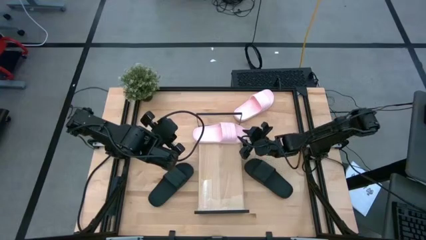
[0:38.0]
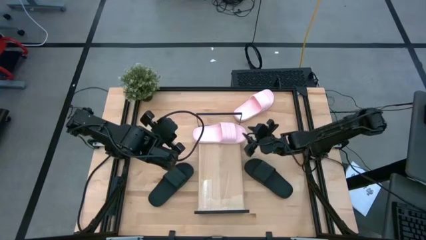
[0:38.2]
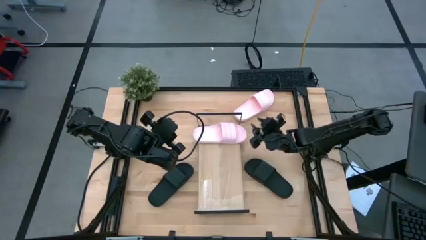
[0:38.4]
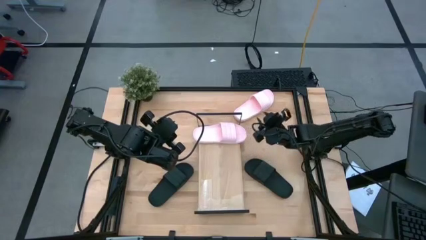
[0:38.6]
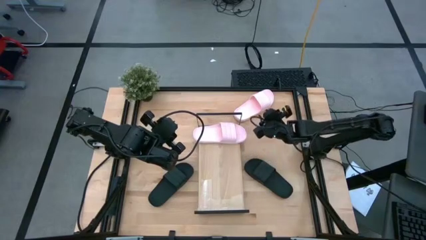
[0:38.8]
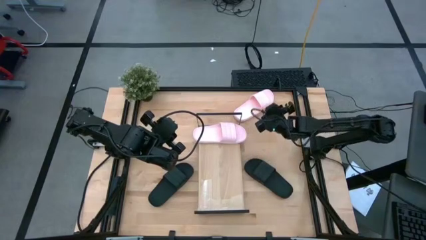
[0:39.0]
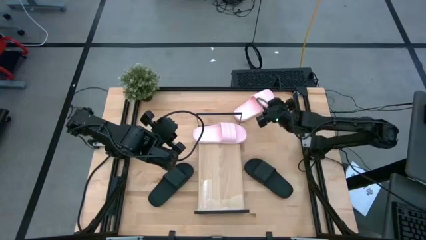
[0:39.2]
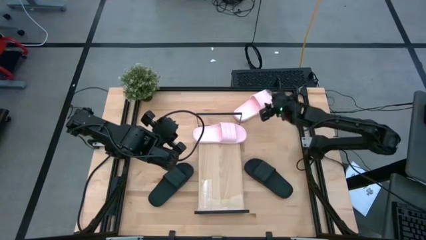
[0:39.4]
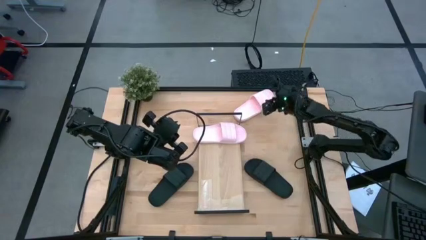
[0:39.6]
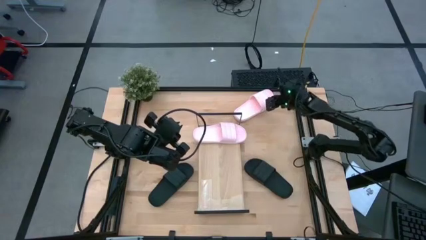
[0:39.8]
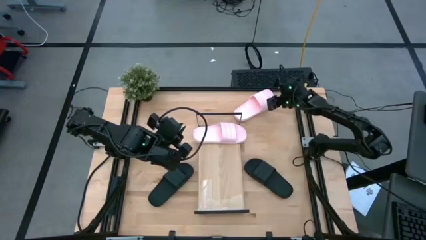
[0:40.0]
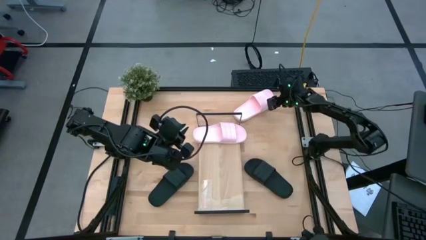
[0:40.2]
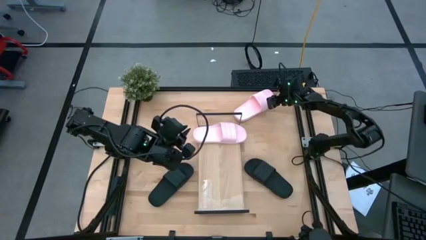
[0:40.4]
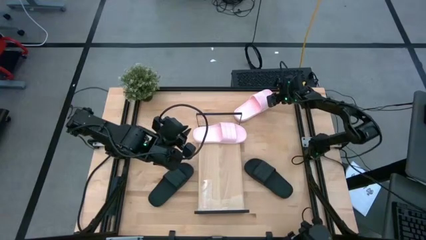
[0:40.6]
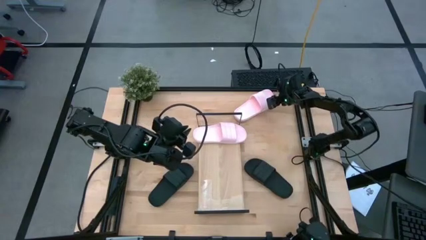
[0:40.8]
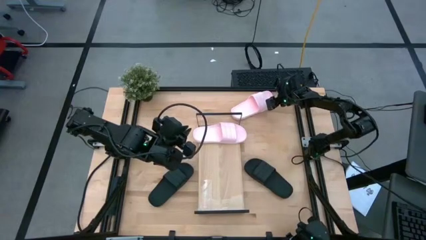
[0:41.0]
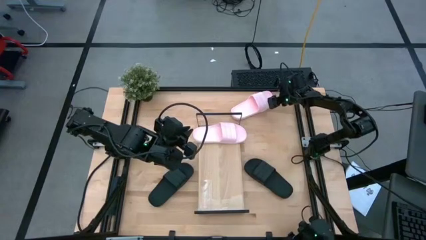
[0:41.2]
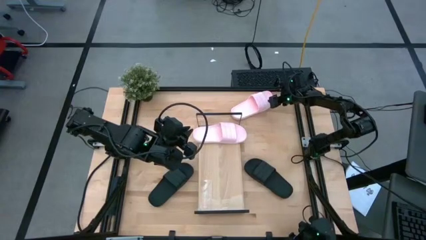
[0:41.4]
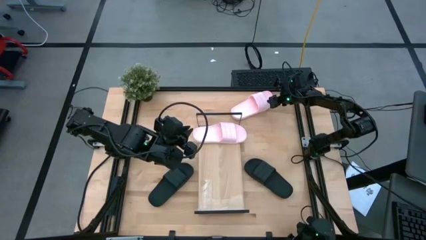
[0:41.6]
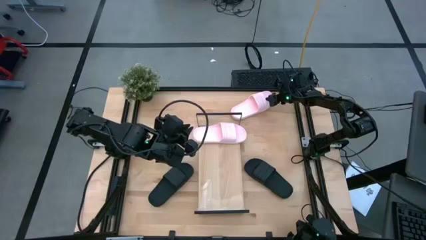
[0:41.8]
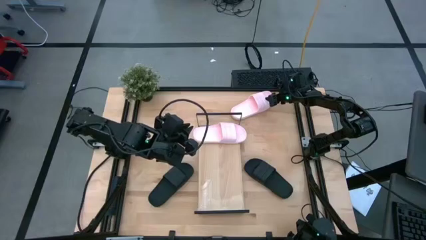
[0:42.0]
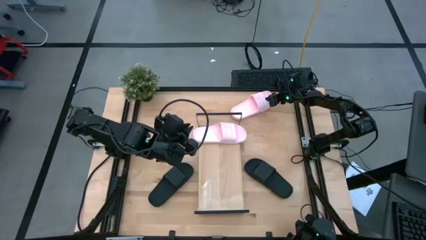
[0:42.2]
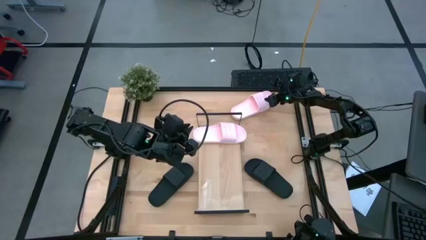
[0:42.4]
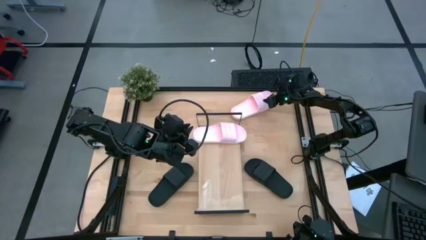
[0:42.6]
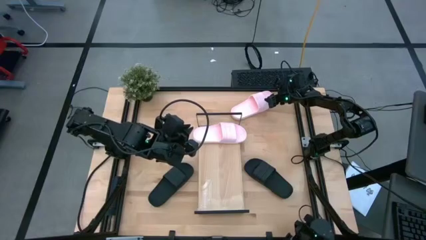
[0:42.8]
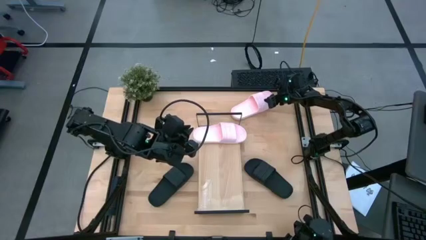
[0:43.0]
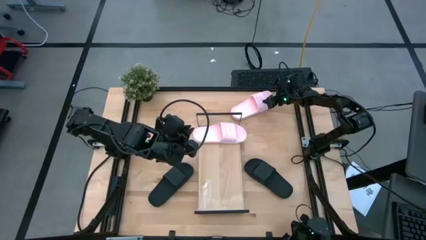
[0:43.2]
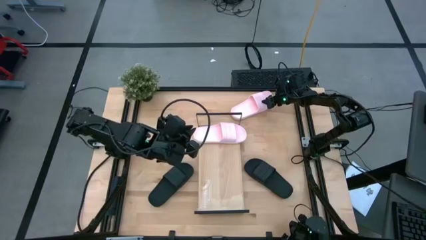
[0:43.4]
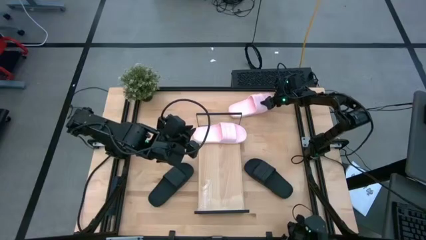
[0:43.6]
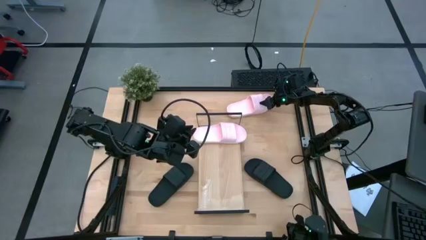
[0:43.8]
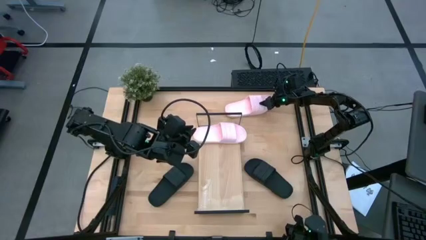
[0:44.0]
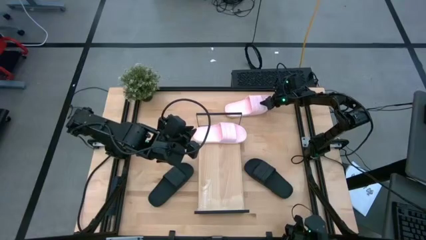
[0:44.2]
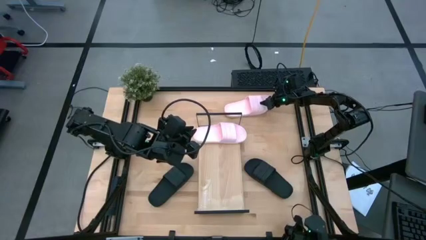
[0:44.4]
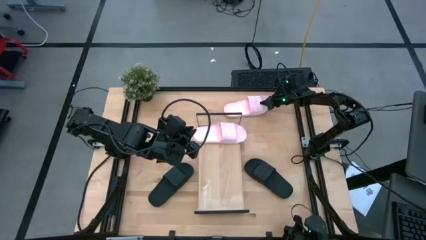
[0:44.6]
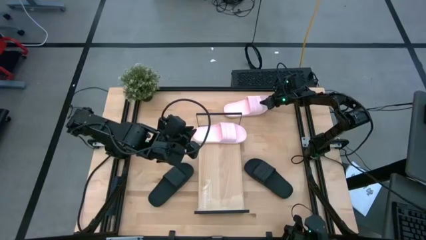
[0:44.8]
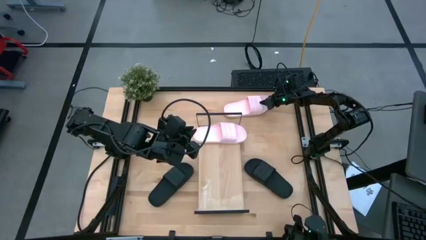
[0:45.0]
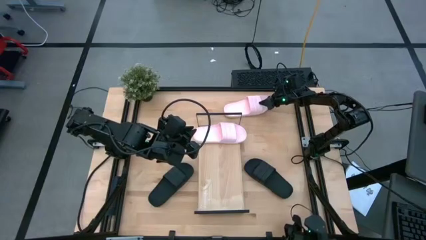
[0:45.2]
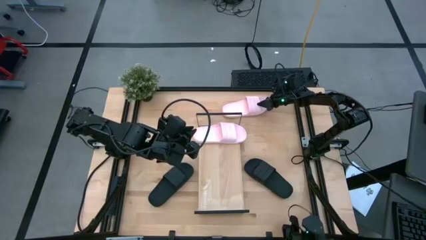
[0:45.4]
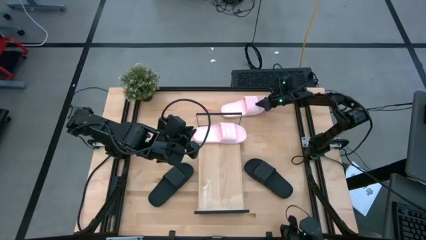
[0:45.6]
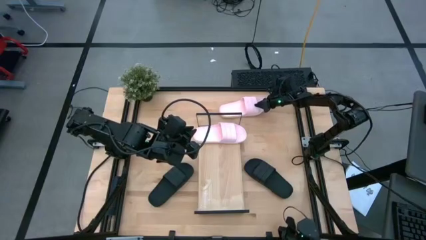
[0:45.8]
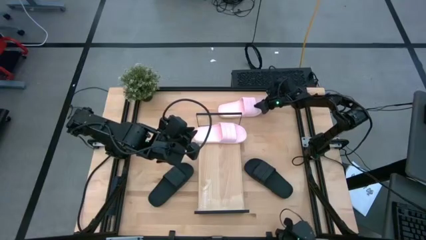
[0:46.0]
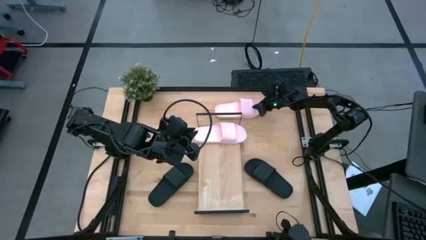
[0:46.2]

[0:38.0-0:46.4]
Task: Pick and place slides into the shelf
Put the pink slide on the shelf

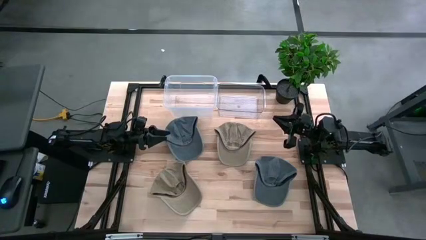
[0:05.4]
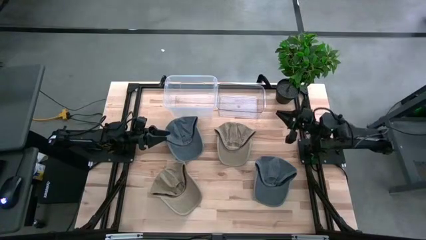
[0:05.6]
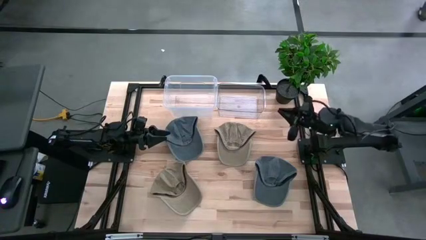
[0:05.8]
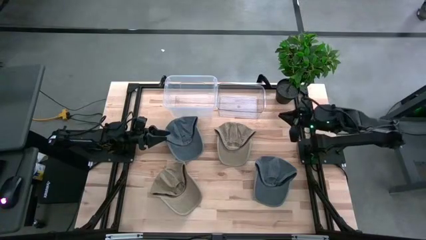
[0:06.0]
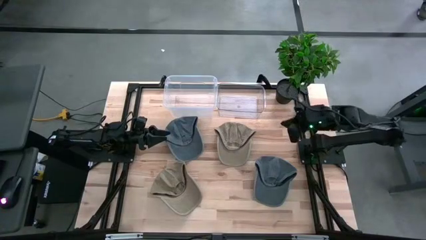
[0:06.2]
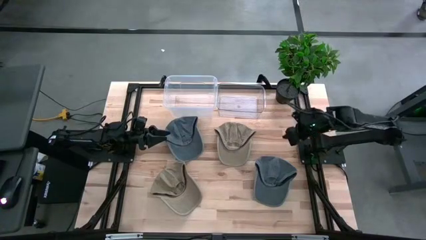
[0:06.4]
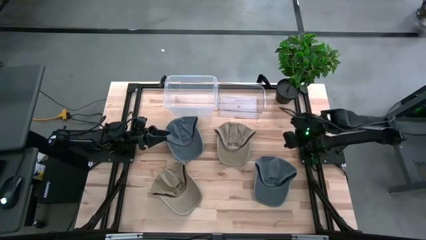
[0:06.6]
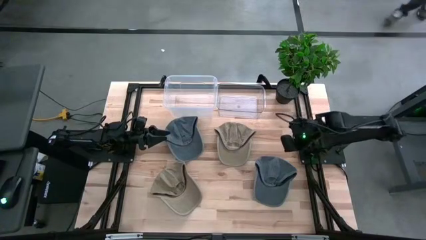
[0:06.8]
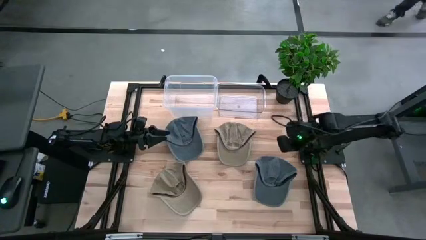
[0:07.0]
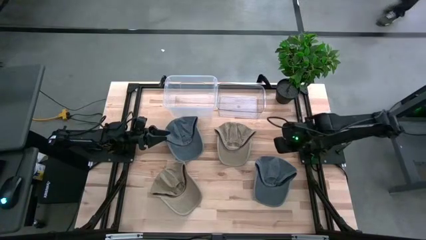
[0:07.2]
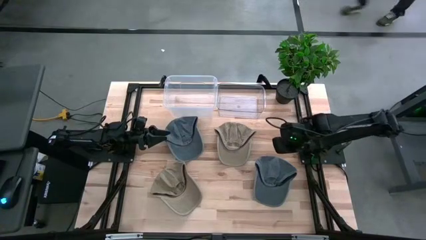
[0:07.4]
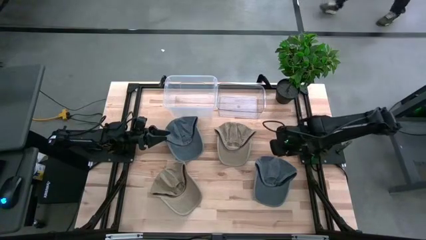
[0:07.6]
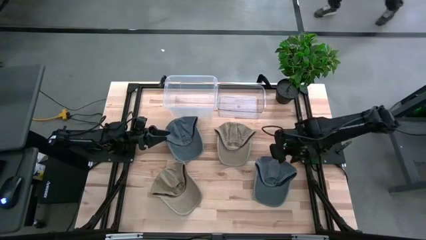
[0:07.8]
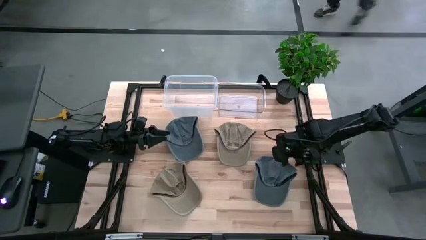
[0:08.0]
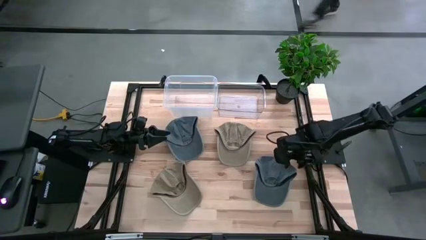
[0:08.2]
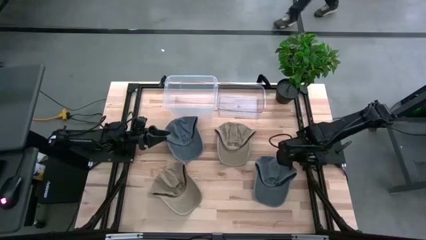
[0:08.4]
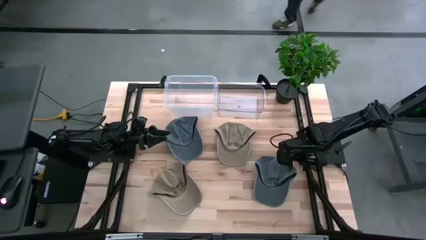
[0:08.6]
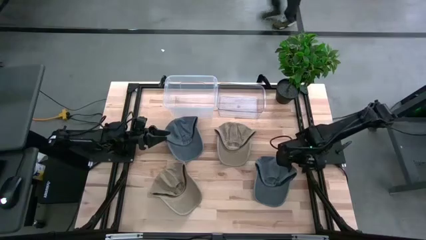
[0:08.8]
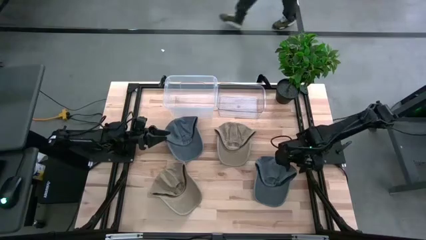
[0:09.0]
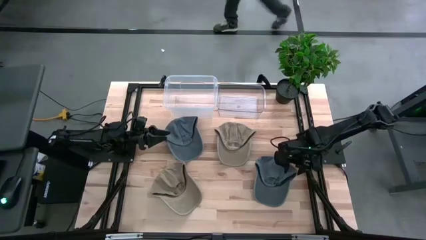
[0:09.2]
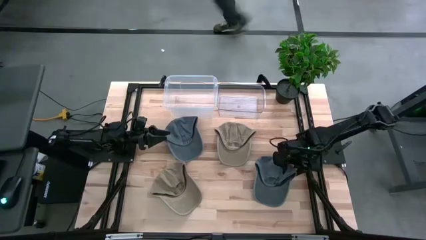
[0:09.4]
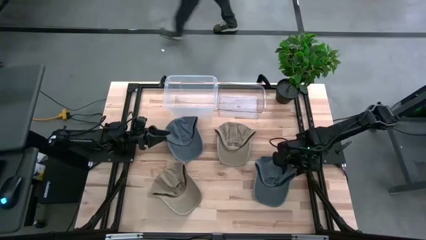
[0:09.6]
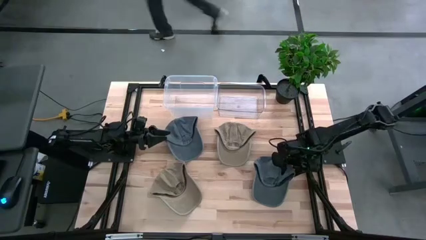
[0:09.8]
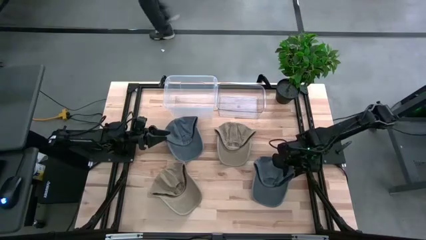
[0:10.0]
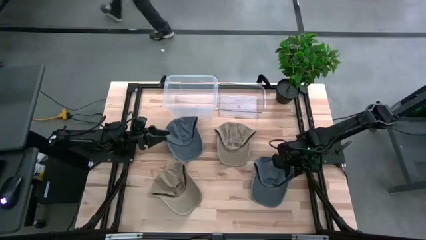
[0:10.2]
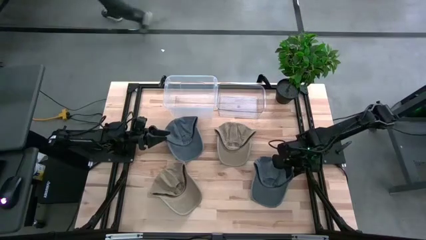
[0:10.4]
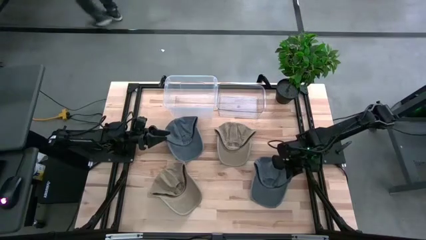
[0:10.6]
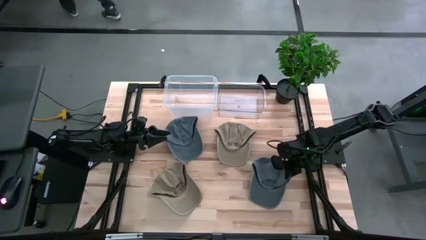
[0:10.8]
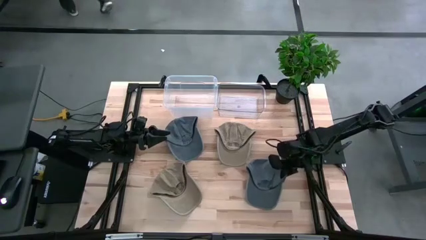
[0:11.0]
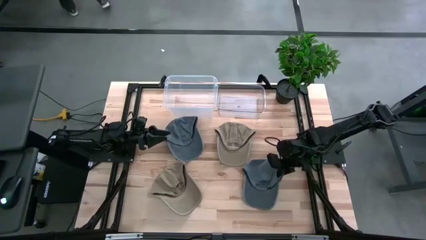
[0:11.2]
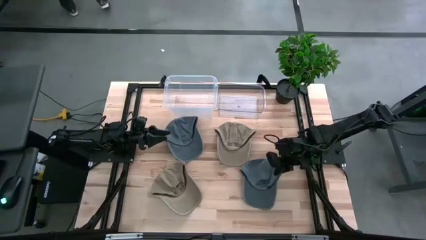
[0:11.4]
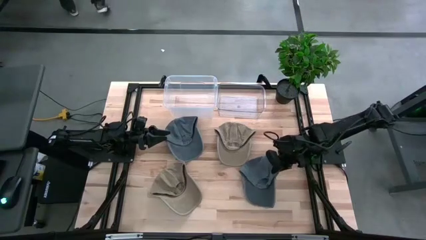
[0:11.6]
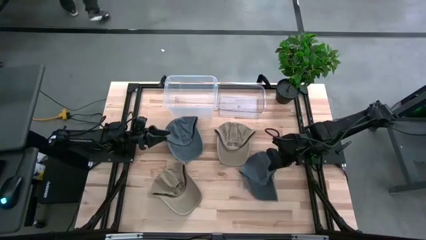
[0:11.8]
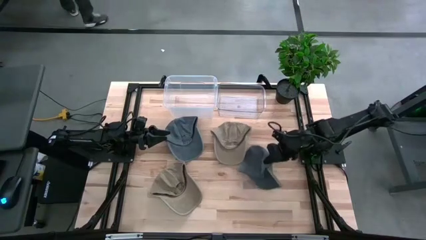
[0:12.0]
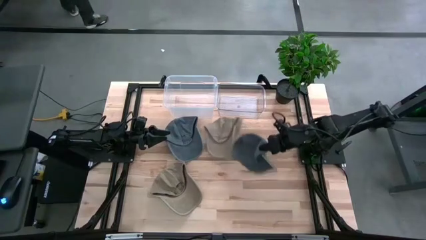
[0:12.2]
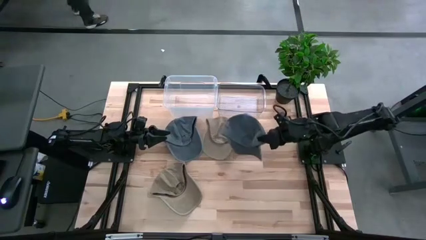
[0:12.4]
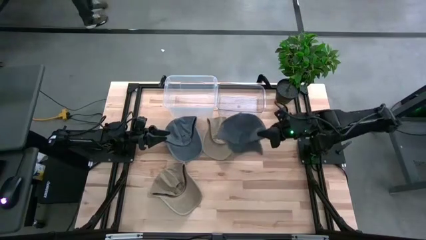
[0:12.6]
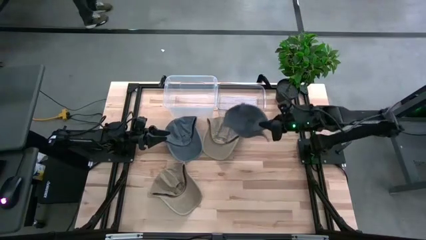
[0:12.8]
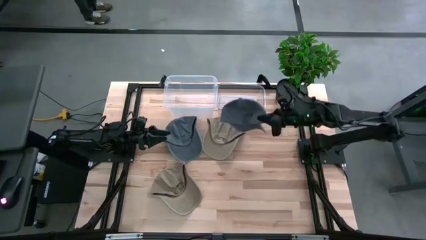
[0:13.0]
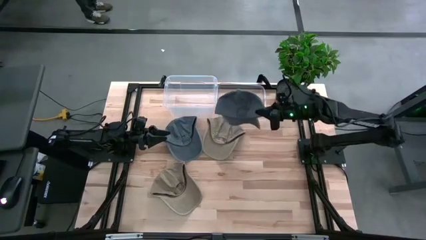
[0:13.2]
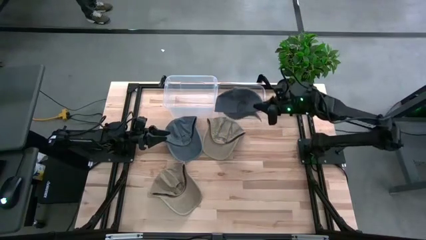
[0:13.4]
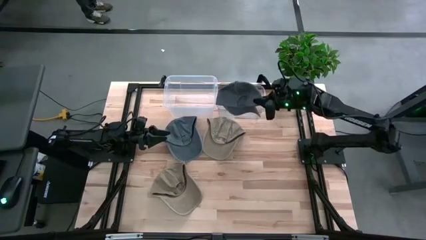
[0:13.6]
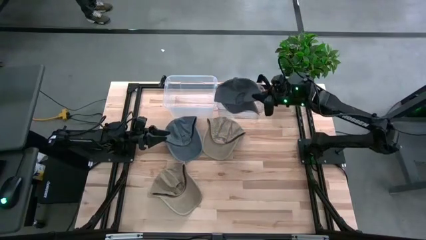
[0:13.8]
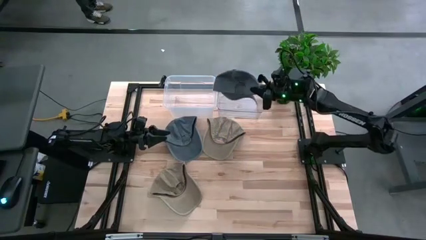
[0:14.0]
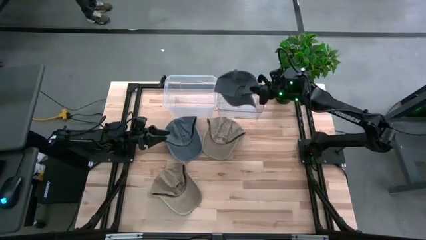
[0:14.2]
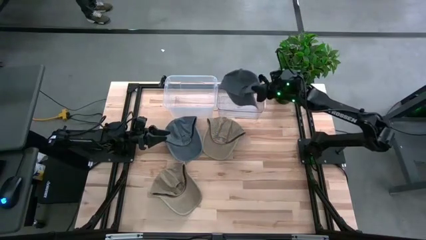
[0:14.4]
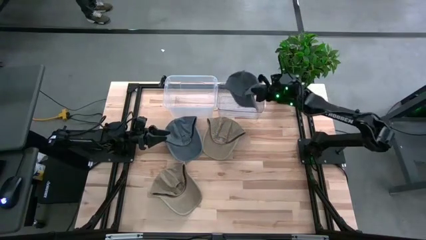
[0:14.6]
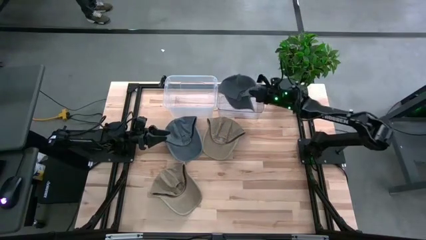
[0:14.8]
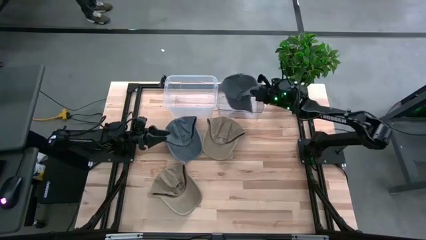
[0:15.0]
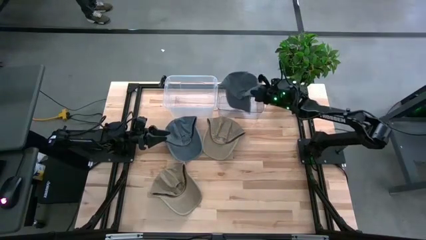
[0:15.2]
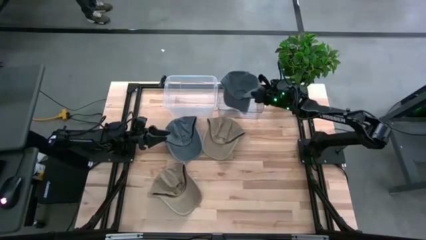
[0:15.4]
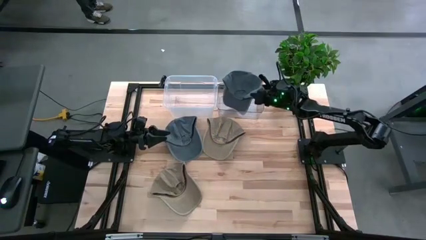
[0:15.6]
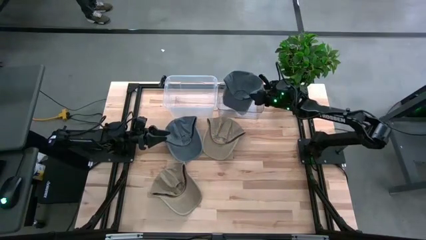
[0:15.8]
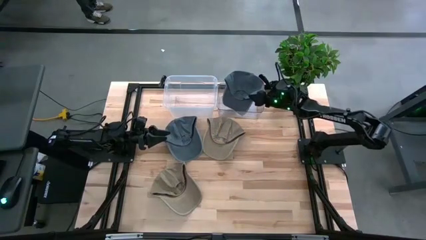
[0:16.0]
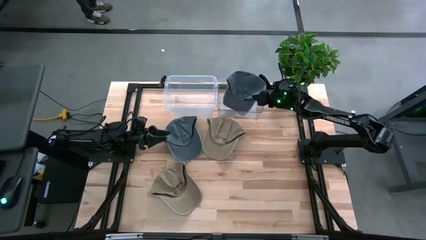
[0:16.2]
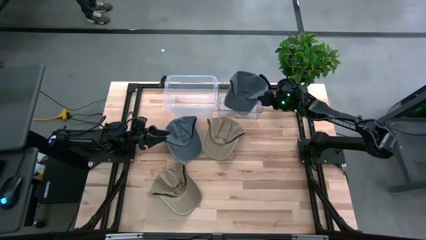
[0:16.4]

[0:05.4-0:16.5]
Task: Pick & Place hat
Put the bottom gray cap into the transparent bin
